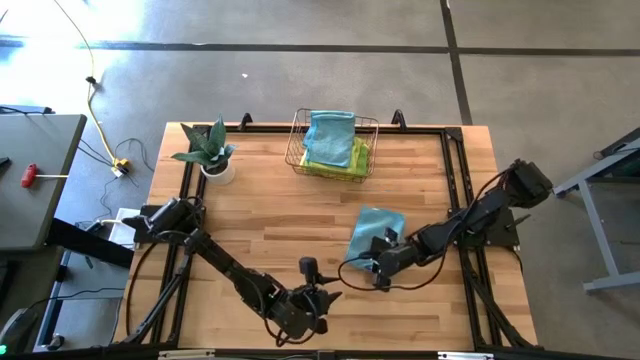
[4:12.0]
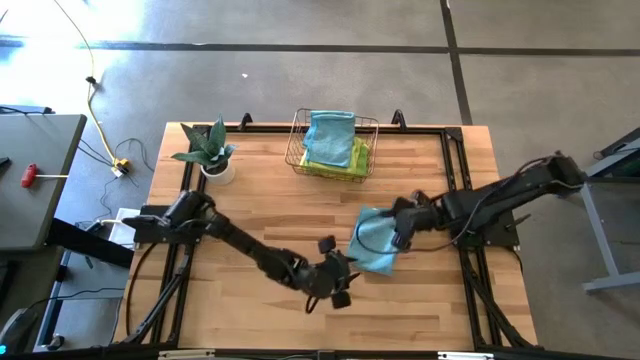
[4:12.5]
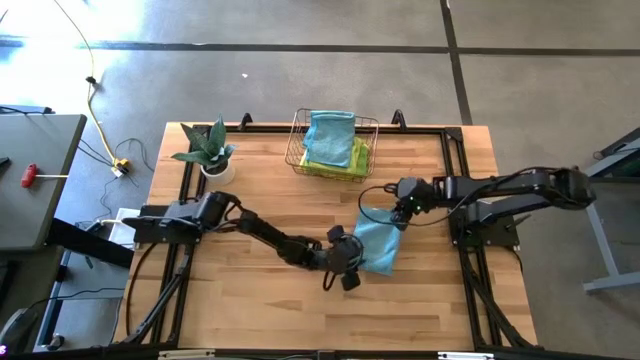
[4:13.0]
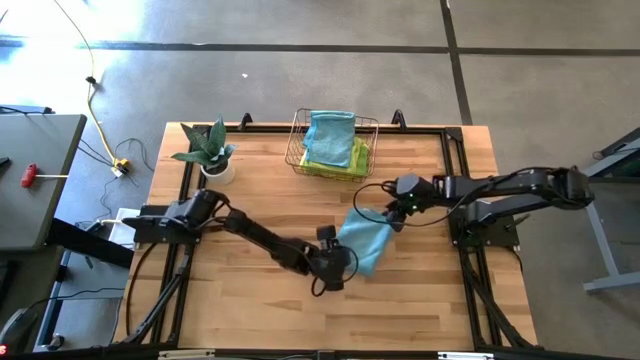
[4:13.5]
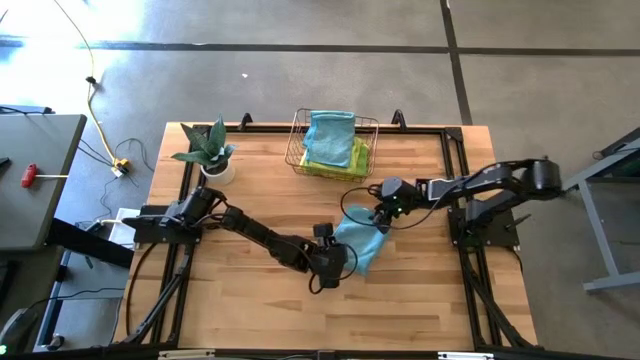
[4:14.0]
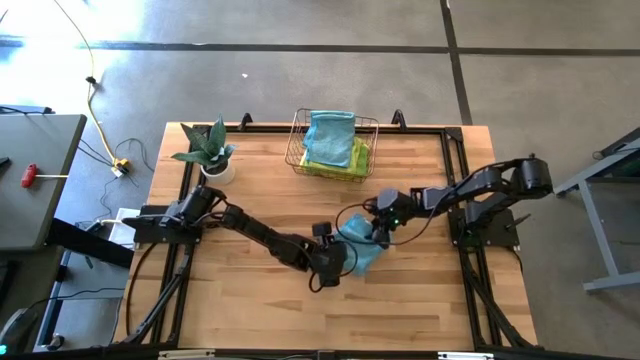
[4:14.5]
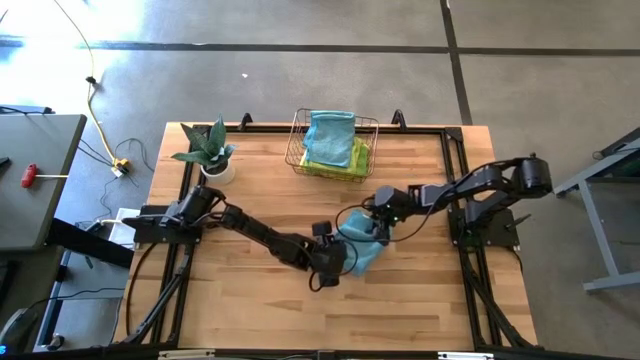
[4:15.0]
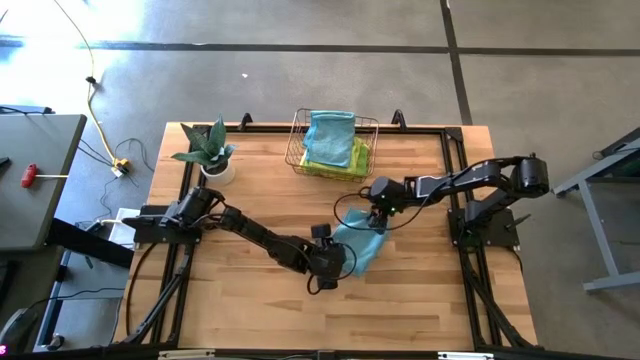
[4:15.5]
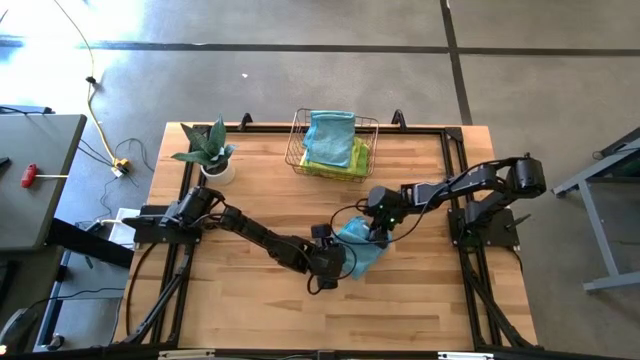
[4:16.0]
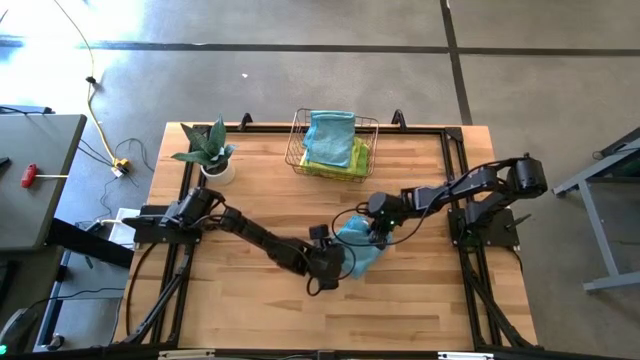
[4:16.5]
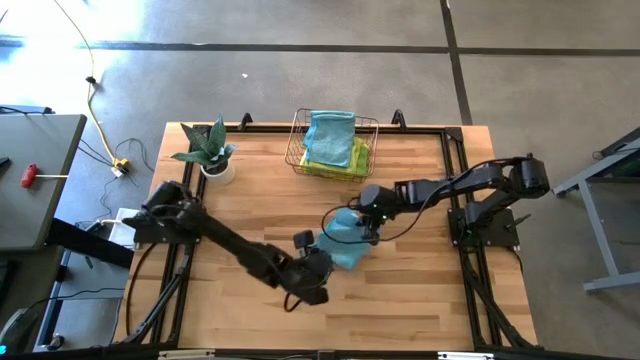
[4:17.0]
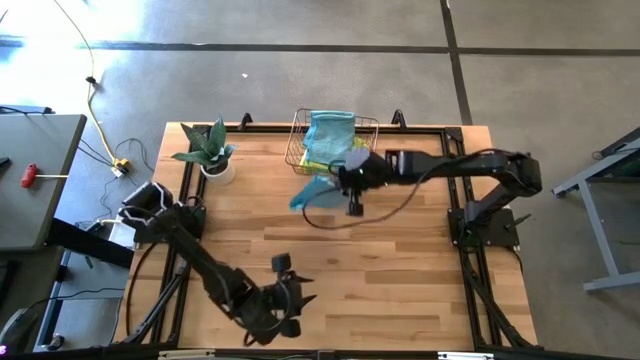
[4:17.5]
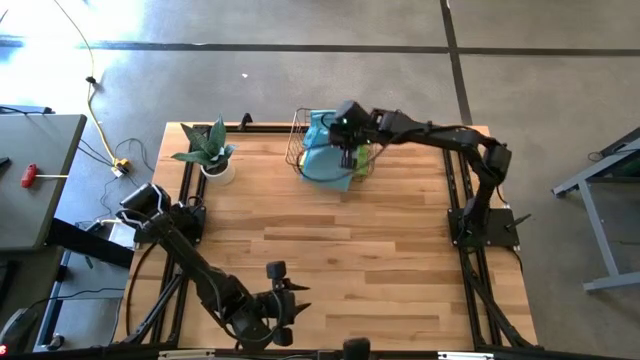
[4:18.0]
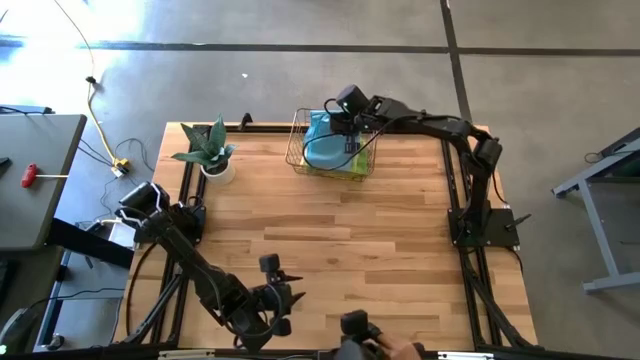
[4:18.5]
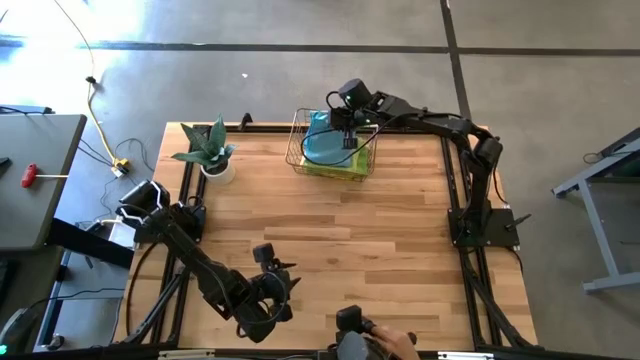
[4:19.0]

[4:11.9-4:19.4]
Task: Fold microfiber towels
Put the blue microfiber towel into the wire basket

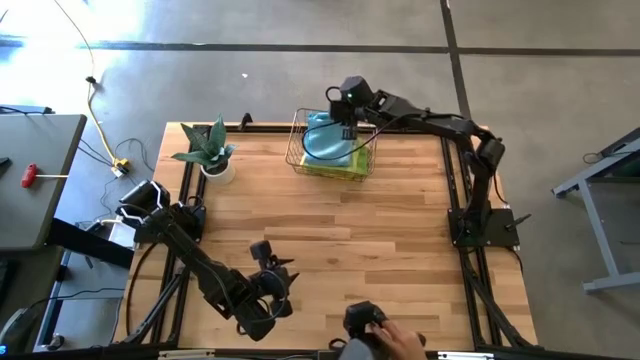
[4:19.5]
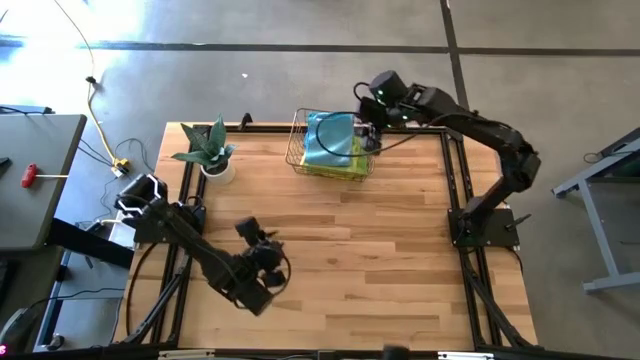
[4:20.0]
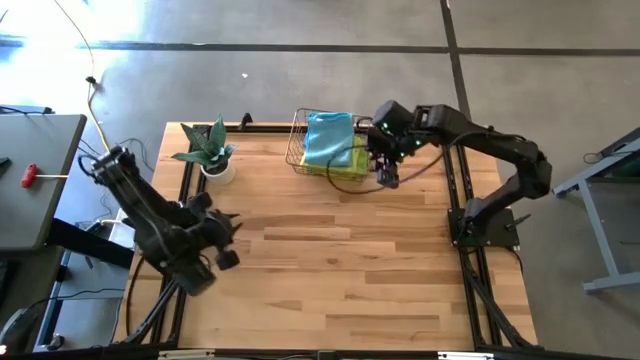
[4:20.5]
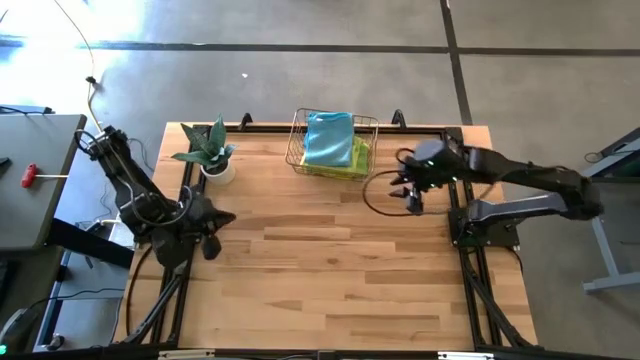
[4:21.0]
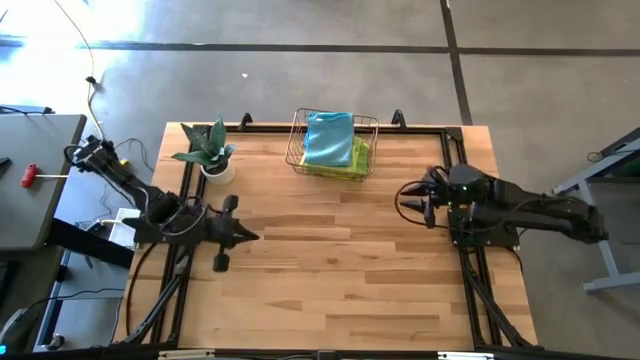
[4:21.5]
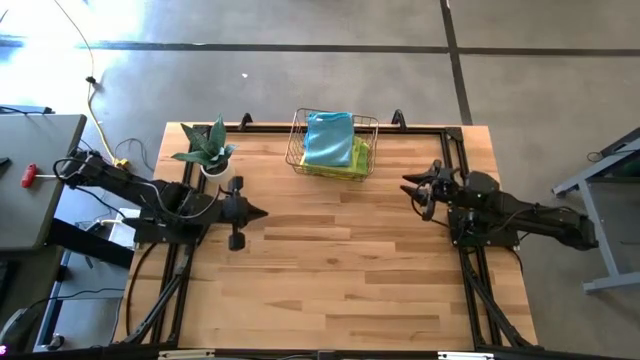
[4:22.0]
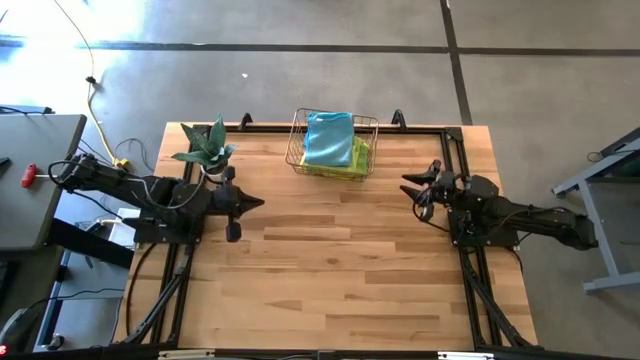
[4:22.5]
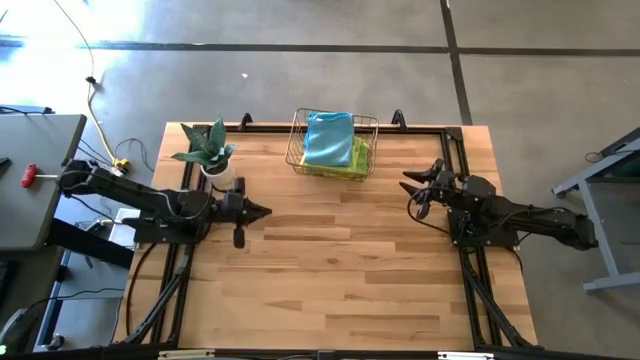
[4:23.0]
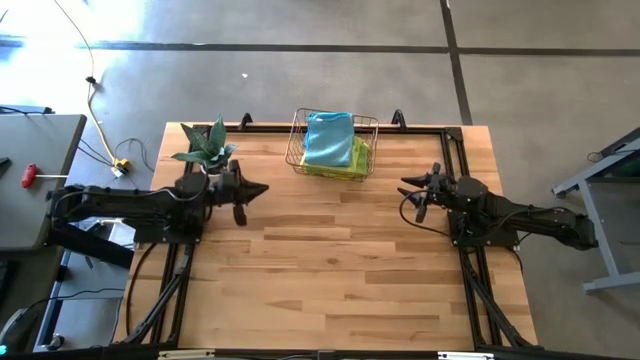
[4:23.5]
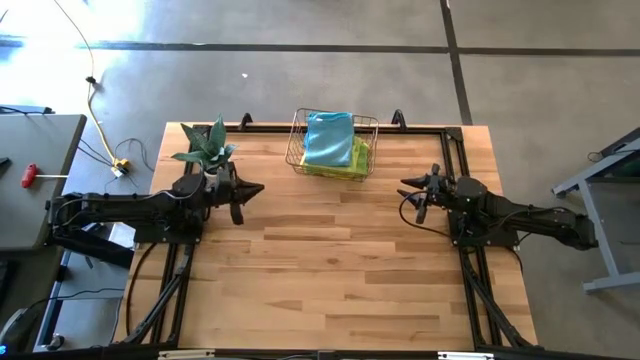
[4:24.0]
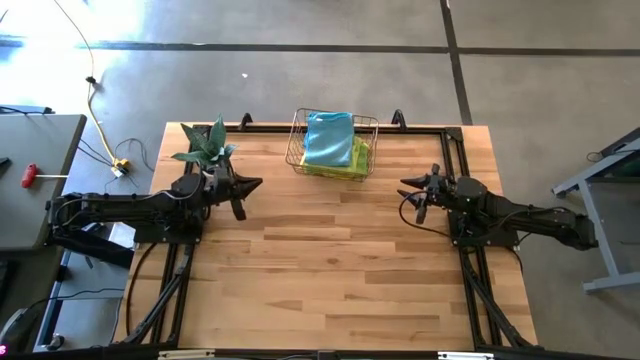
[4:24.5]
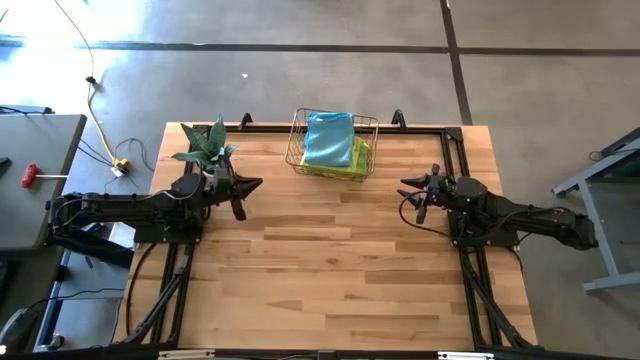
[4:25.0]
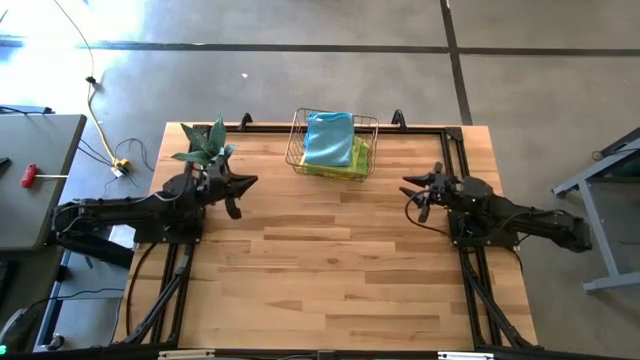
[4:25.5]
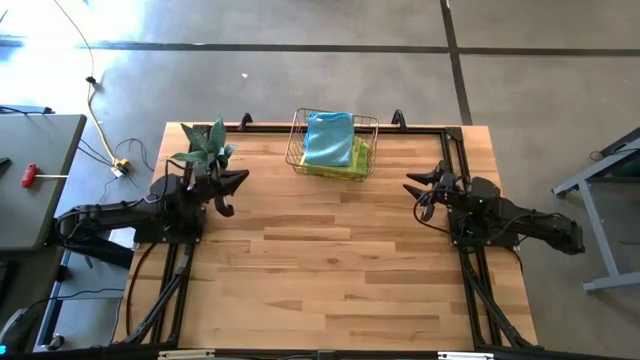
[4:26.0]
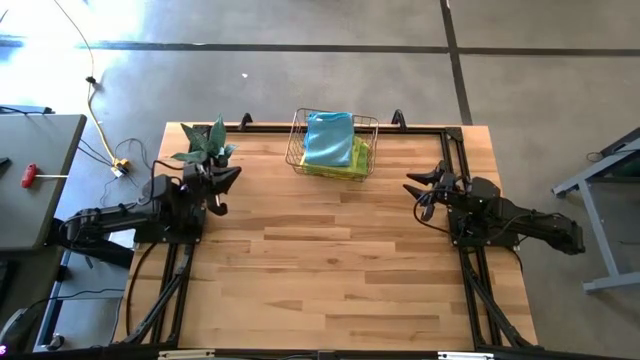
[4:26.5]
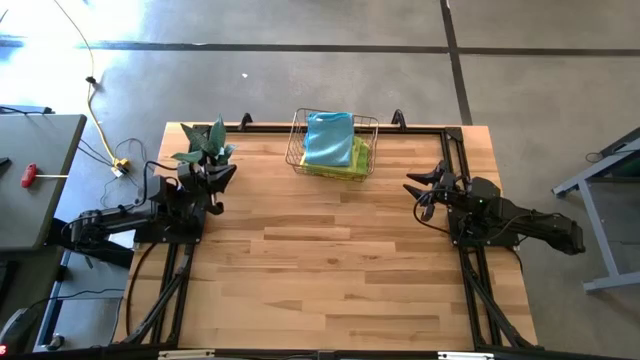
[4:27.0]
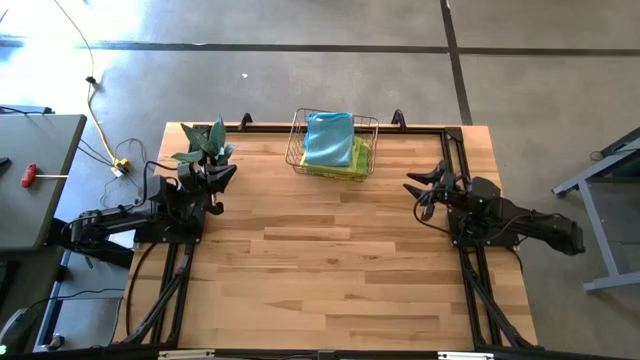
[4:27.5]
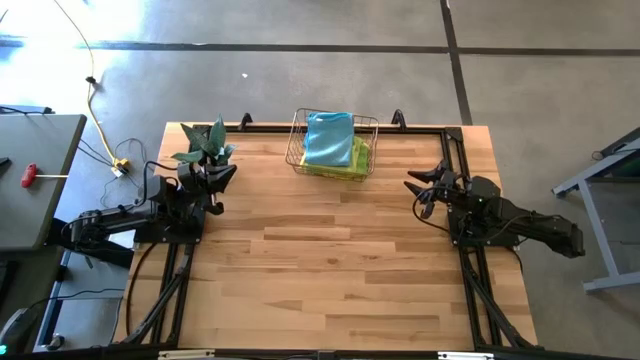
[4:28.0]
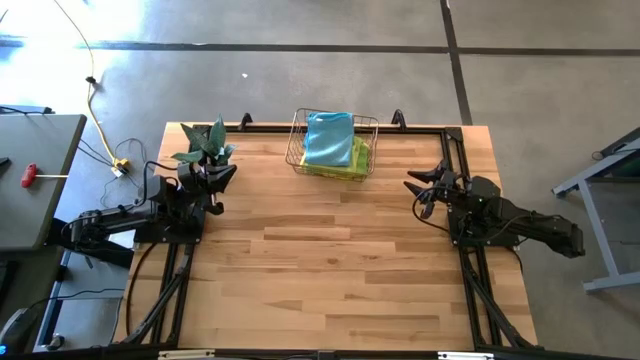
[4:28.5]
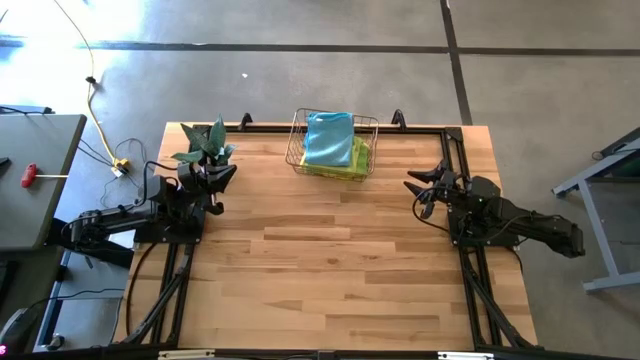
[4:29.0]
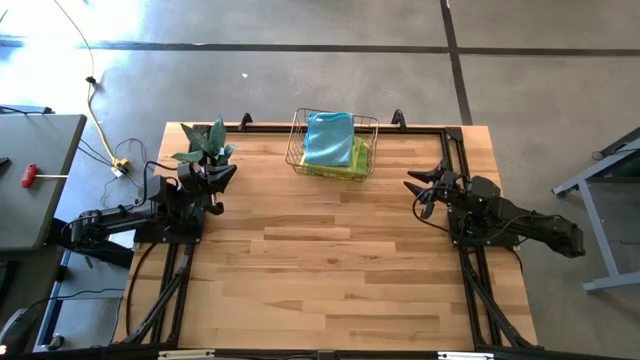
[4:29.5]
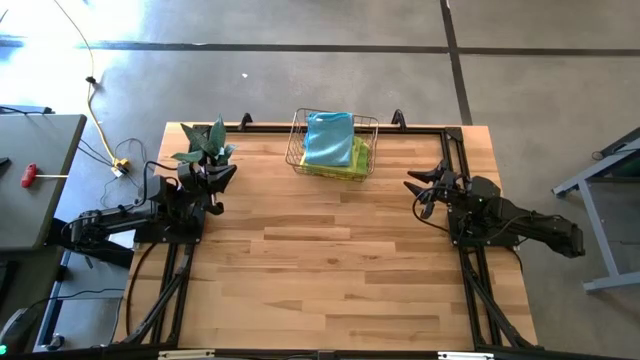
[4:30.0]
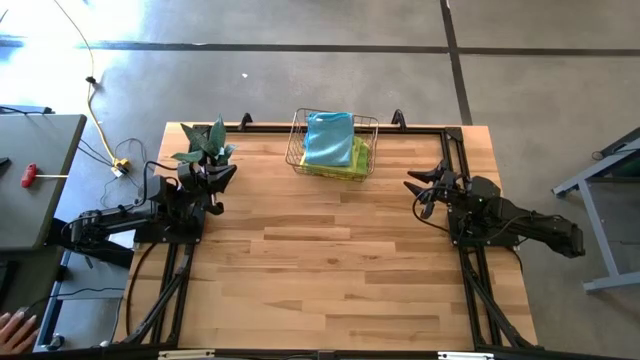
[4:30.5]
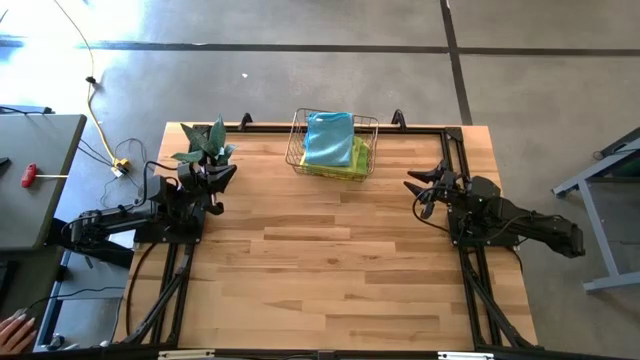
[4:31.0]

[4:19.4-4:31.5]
Return to Home Position

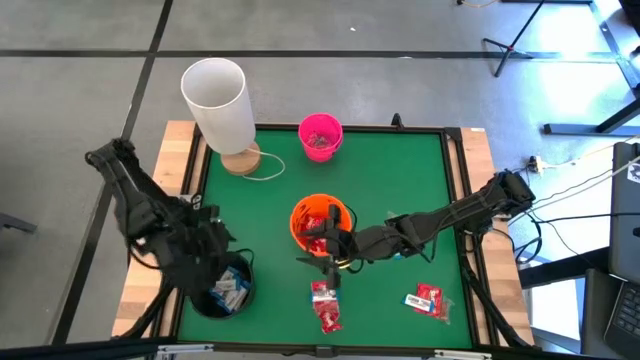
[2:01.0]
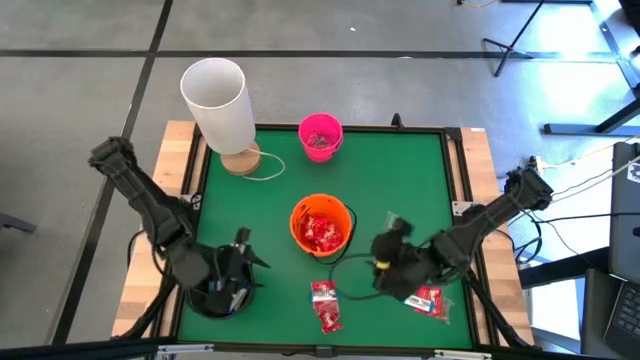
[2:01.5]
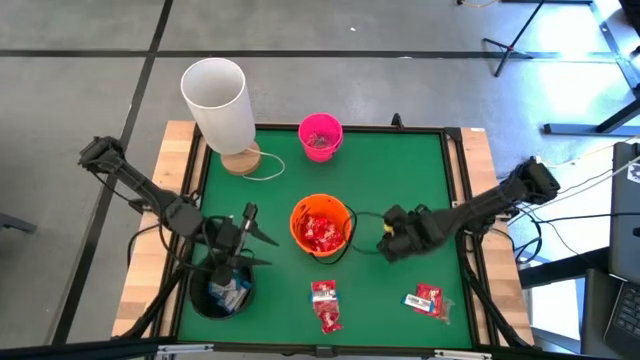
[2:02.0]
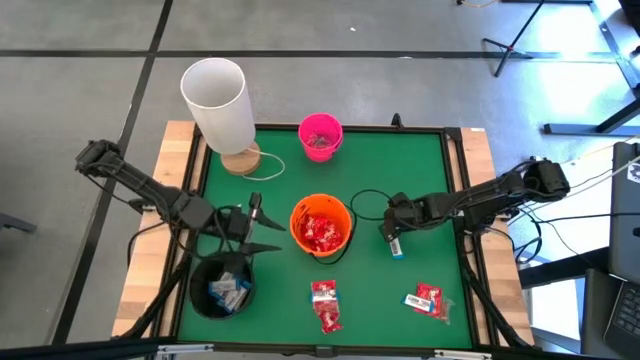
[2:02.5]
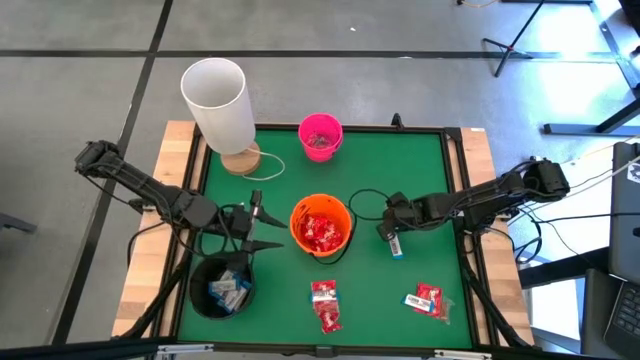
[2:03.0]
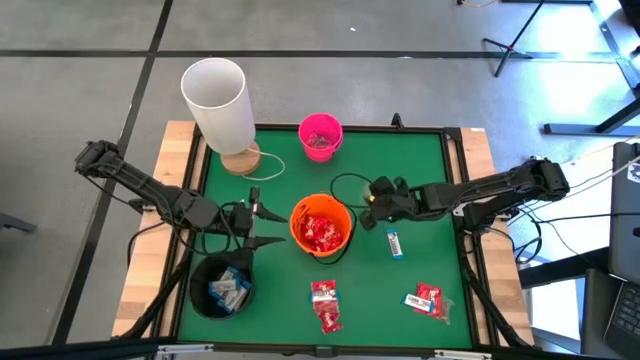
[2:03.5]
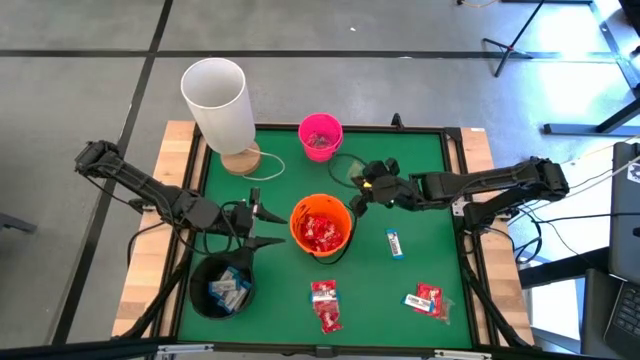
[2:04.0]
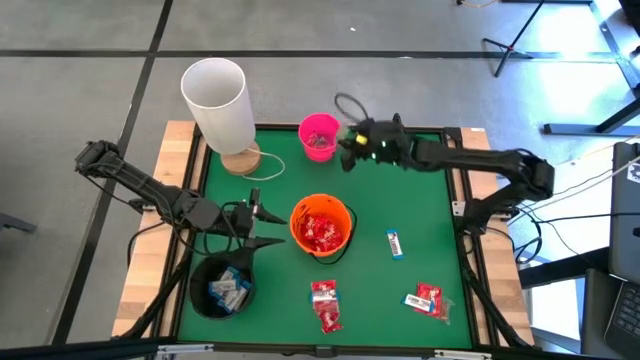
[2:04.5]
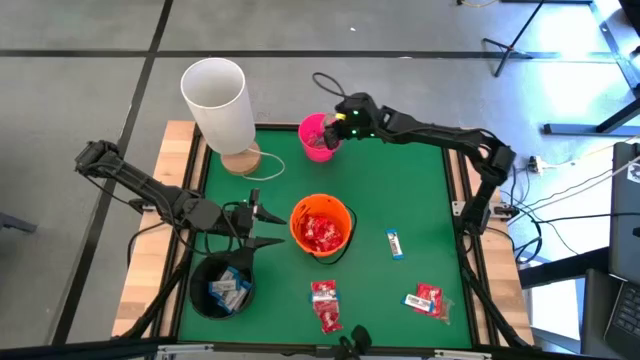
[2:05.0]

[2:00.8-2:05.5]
Task: Sort candy
Put the green gummy into the pink bucket
